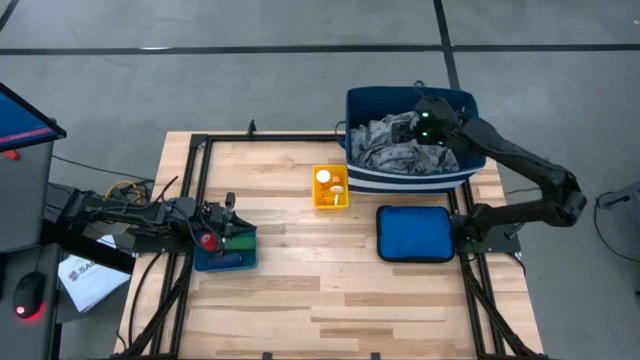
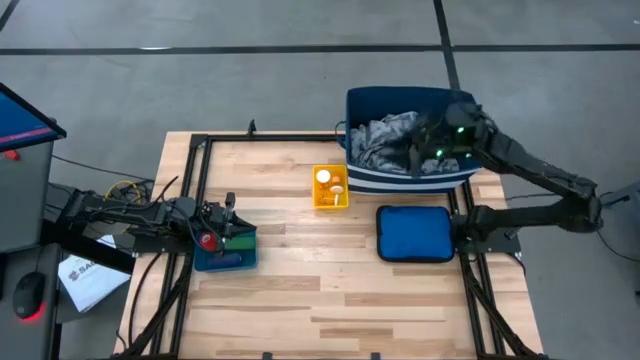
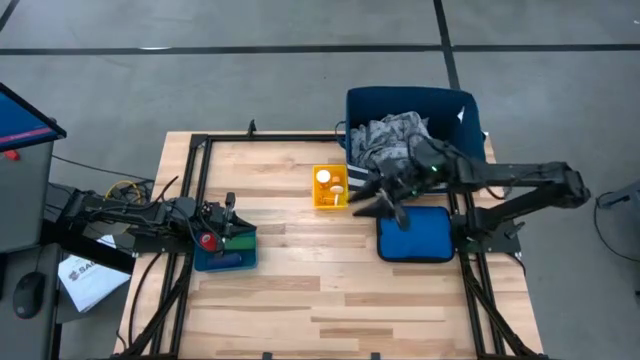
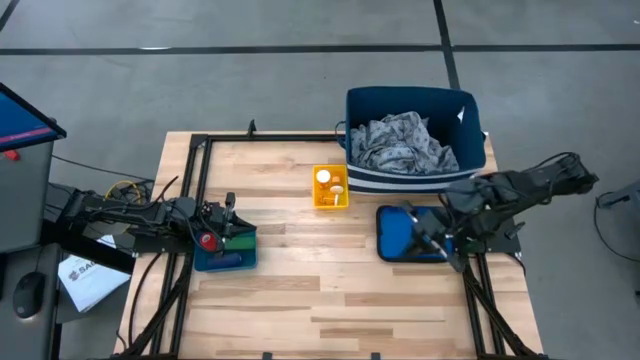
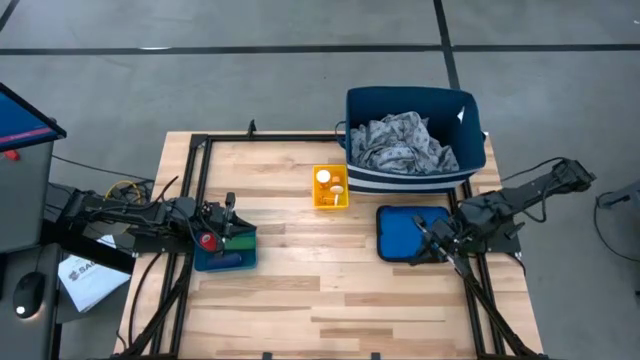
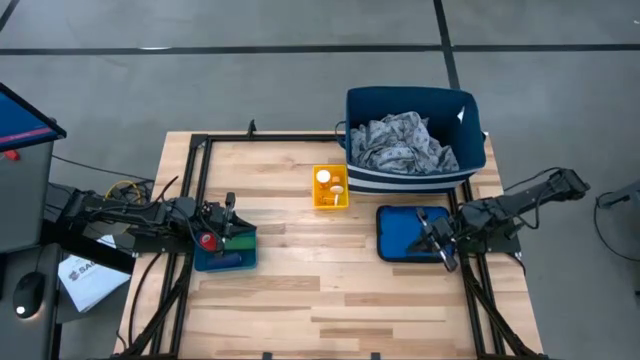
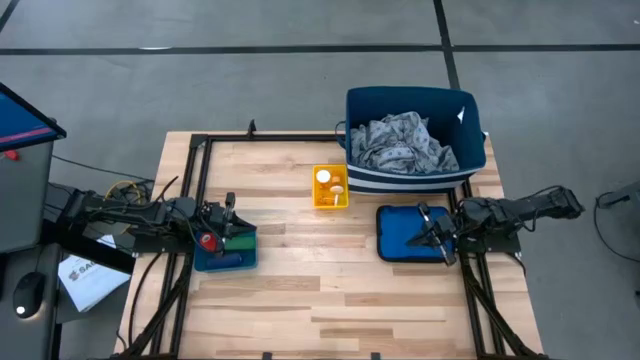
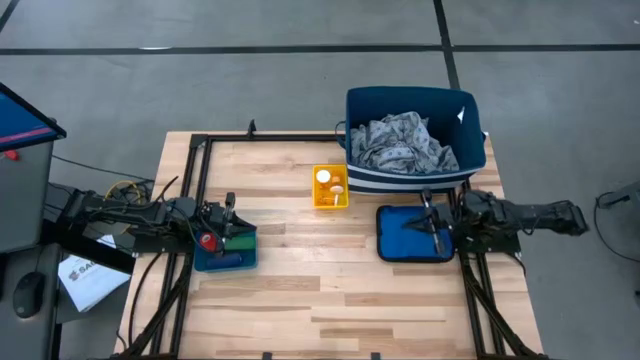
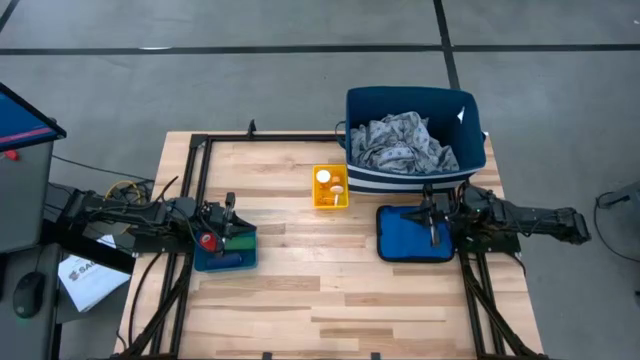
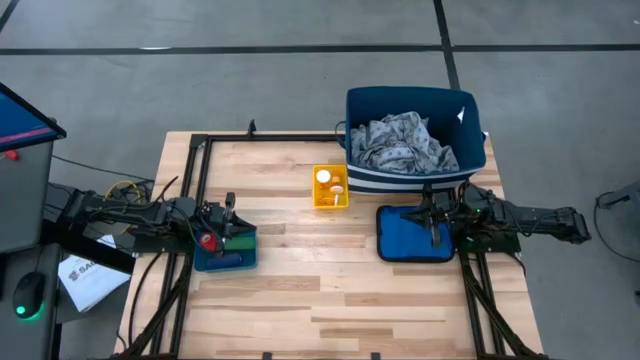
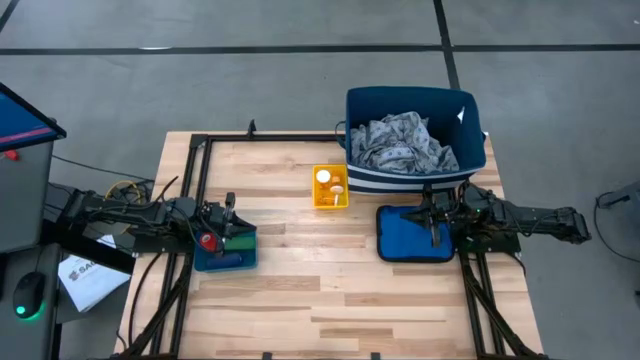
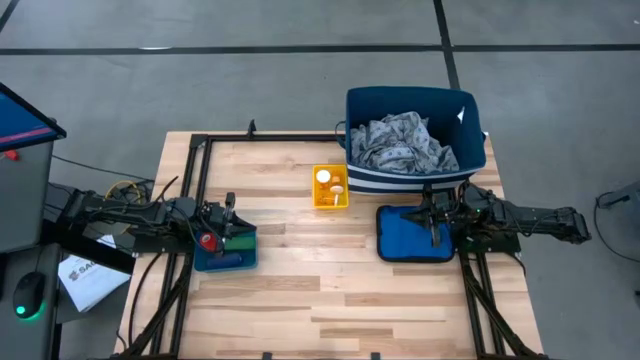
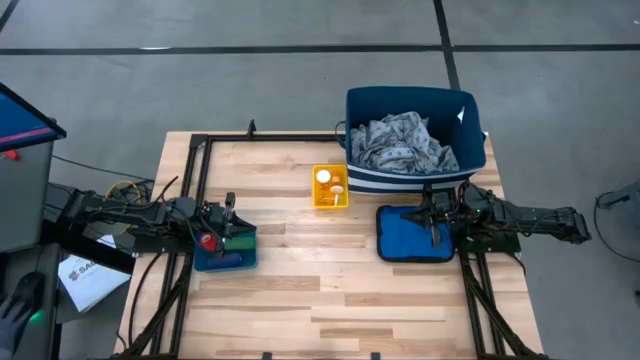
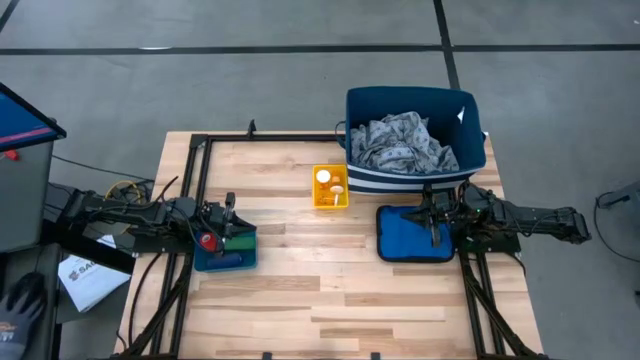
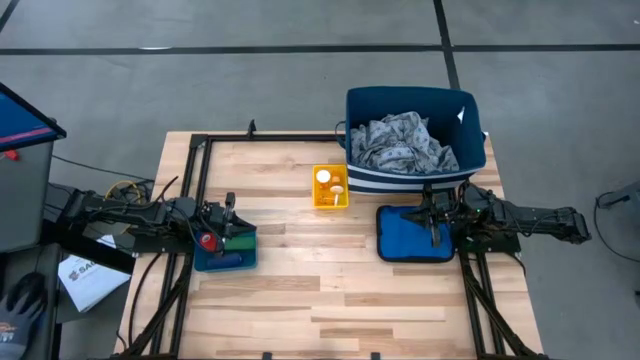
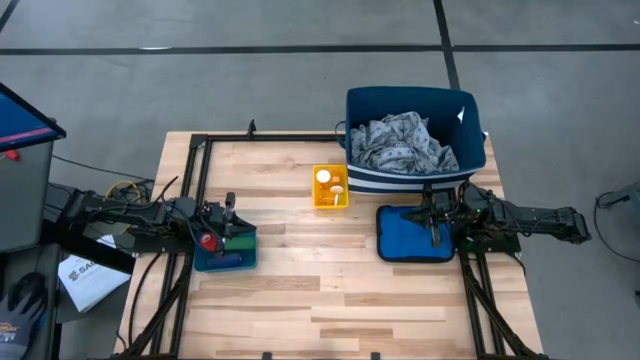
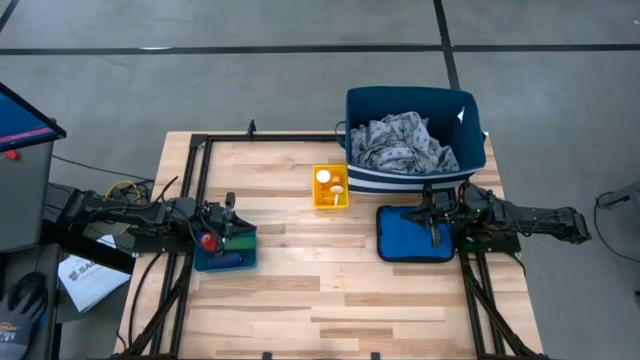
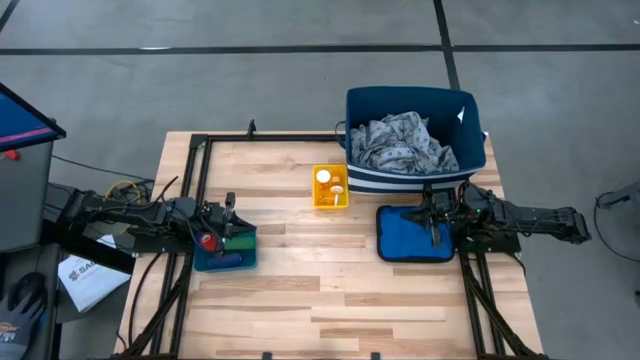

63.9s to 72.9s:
Task: Pick & place medical supplies in basket/bin
Return to Home Position

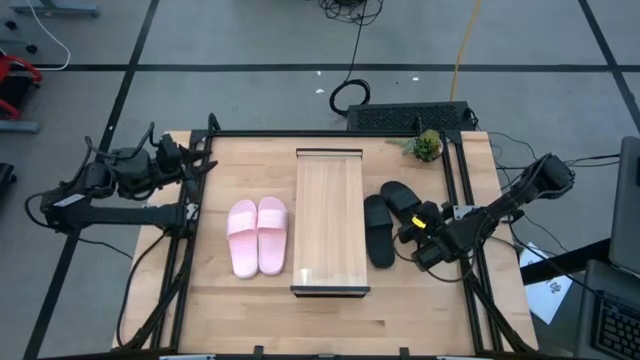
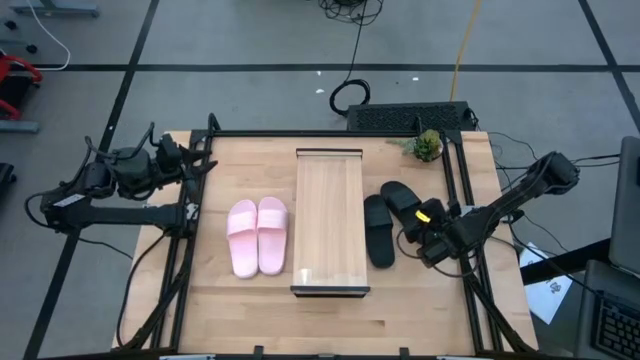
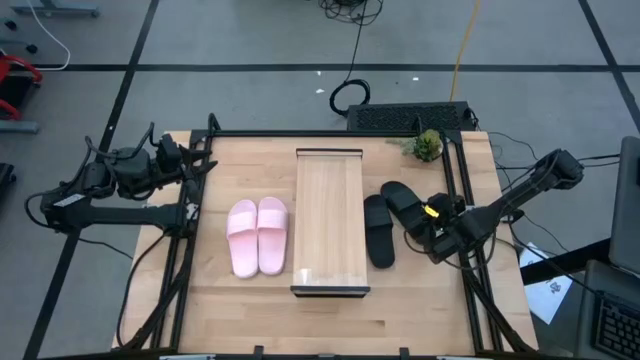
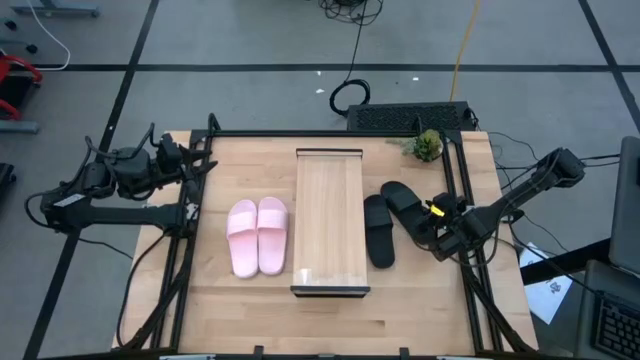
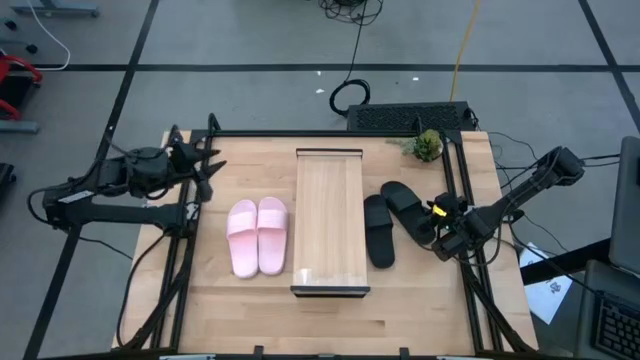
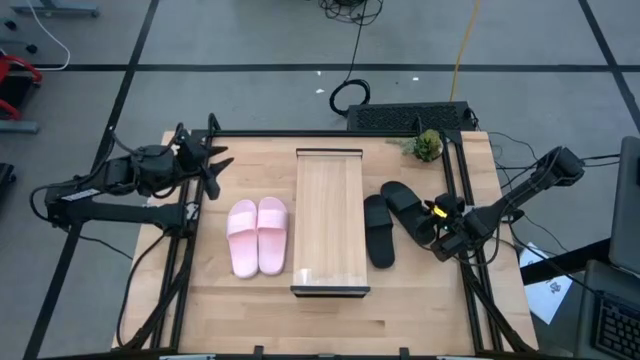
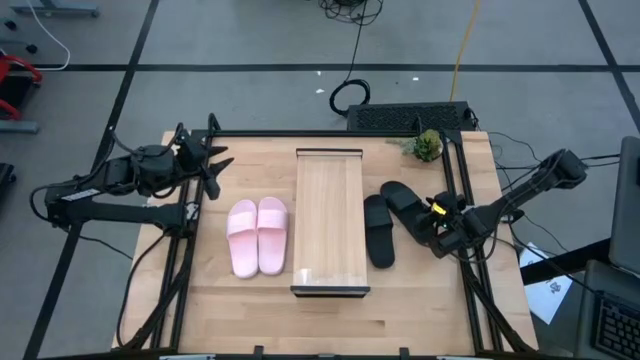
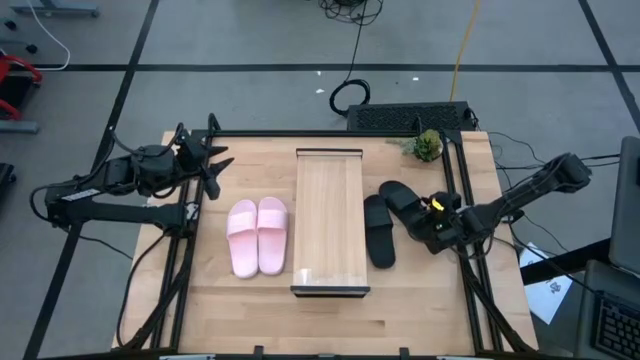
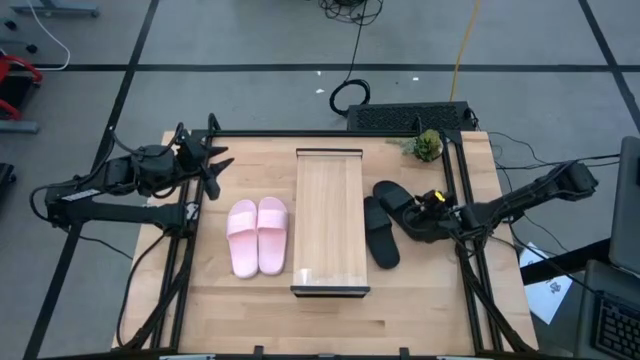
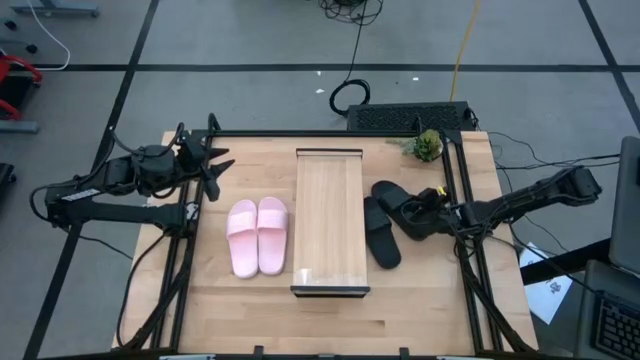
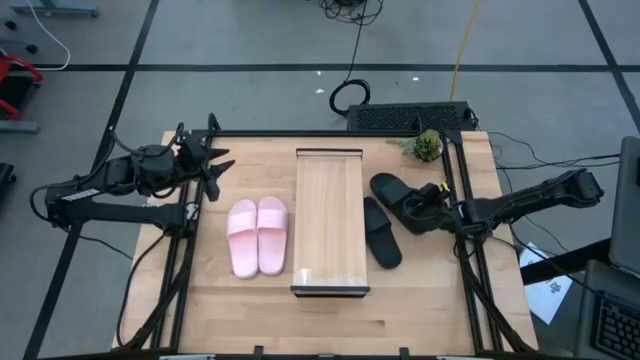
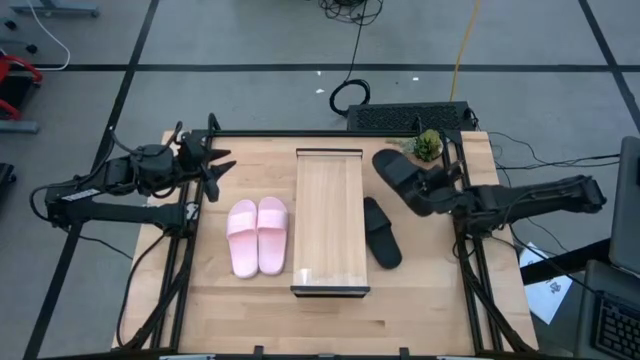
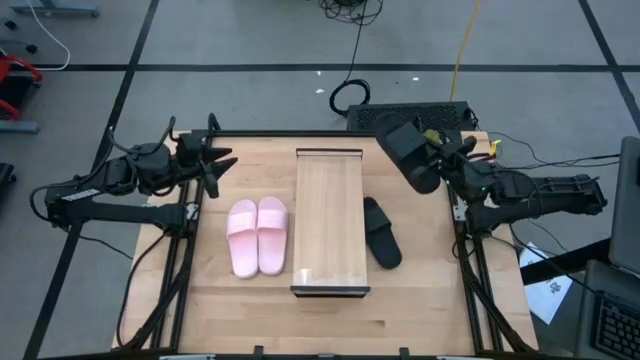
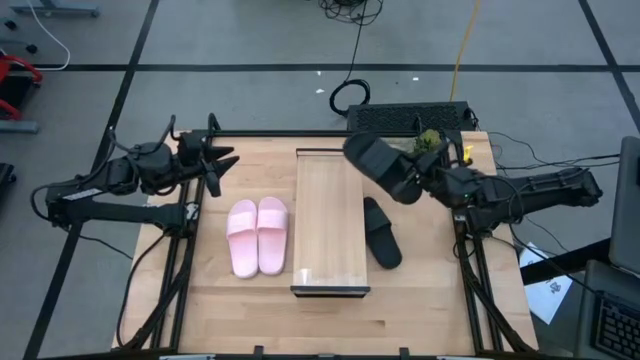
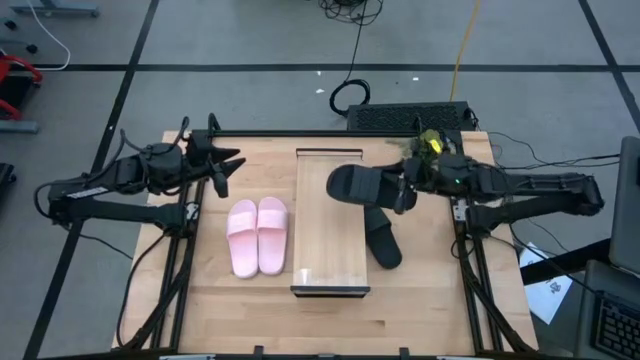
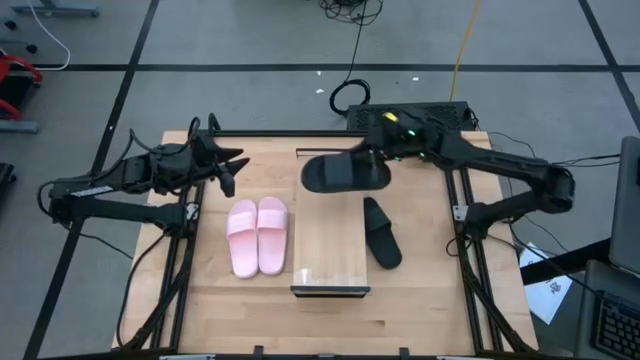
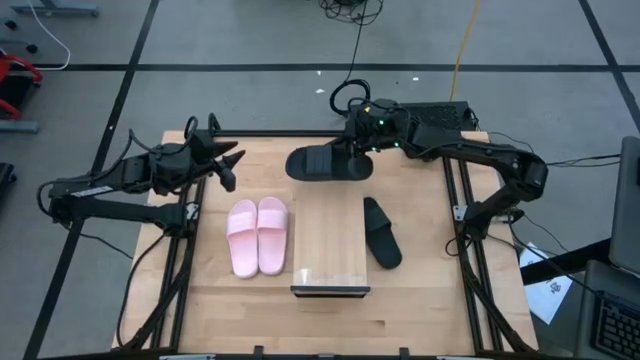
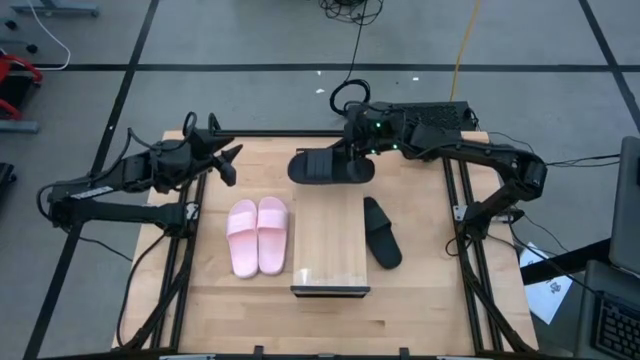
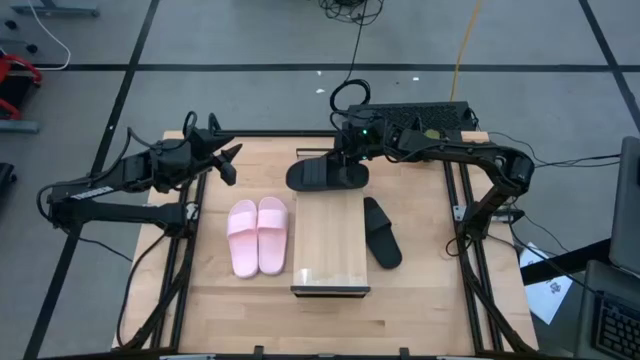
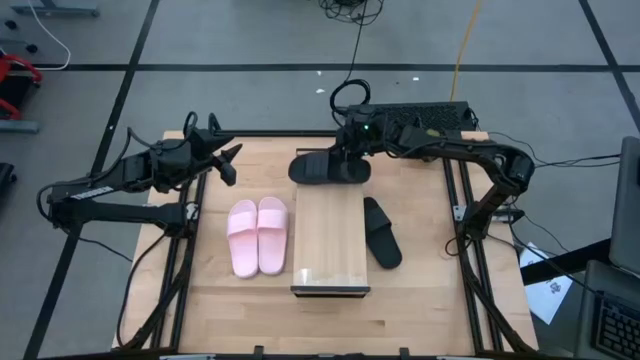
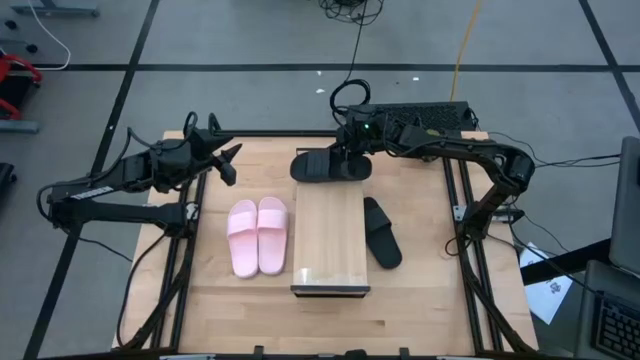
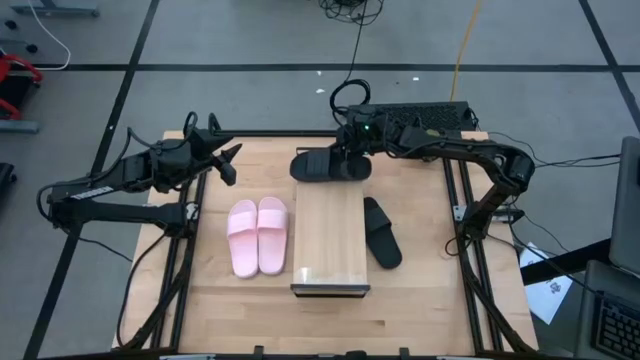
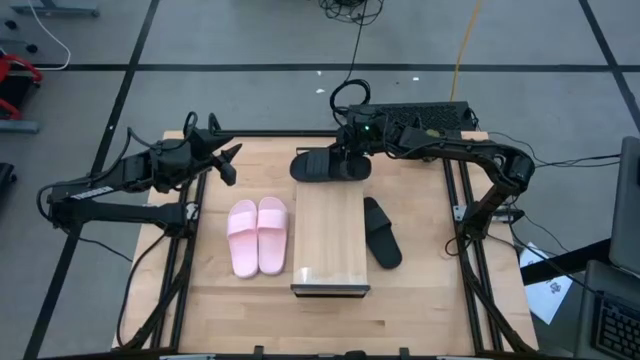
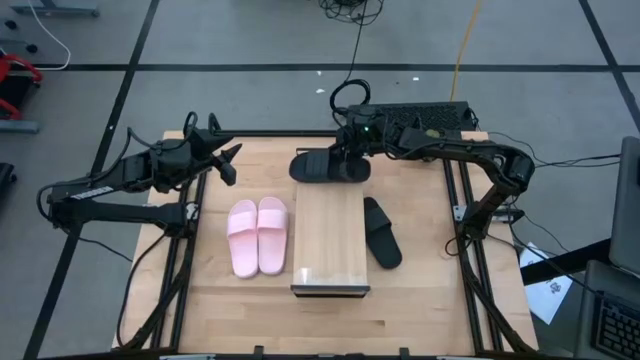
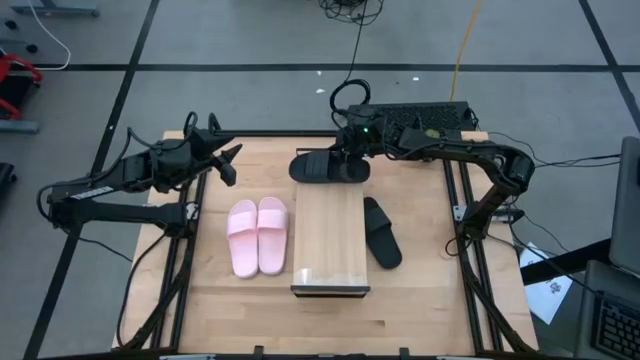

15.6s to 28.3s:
Task: Pick and place slides into the shelf
Put the right black slide on the shelf
